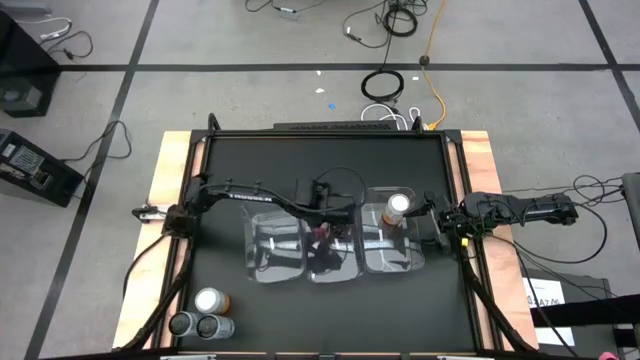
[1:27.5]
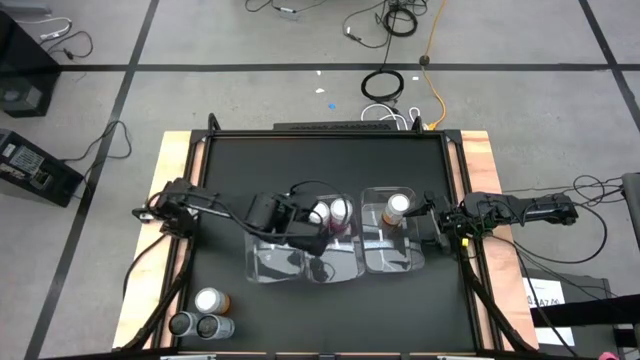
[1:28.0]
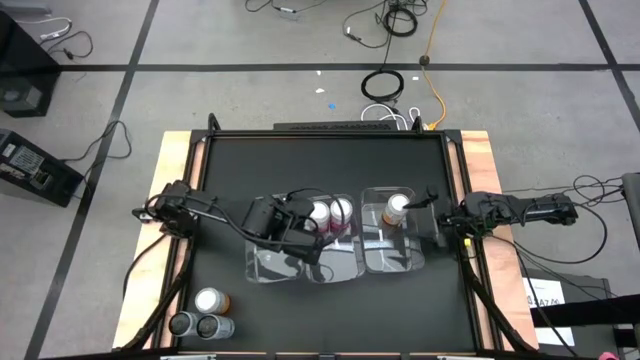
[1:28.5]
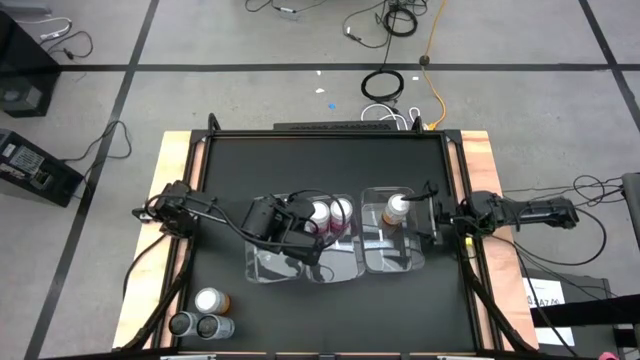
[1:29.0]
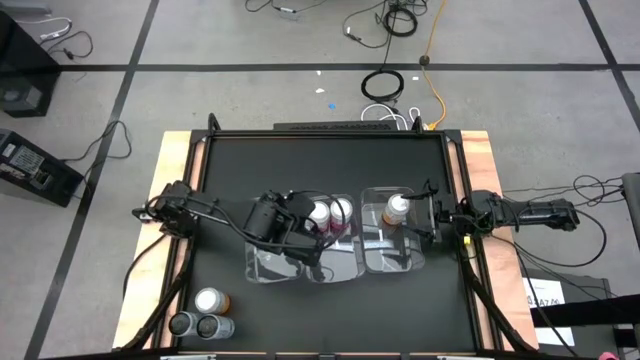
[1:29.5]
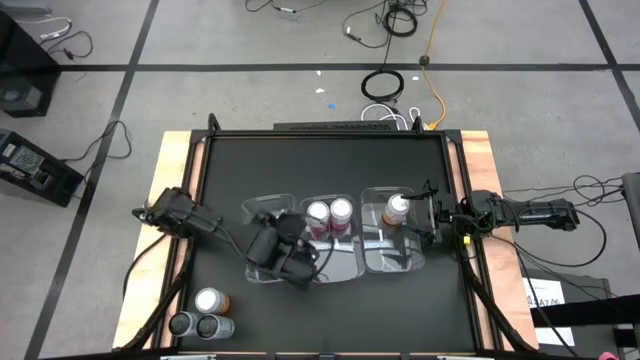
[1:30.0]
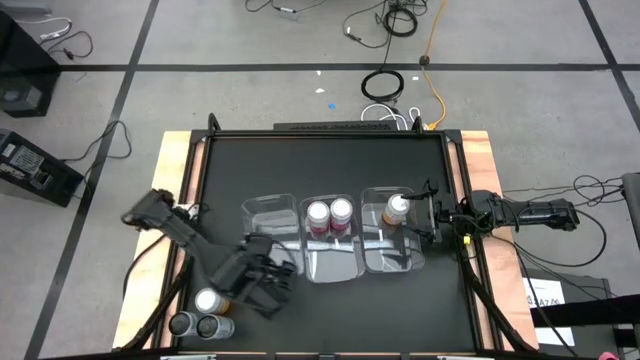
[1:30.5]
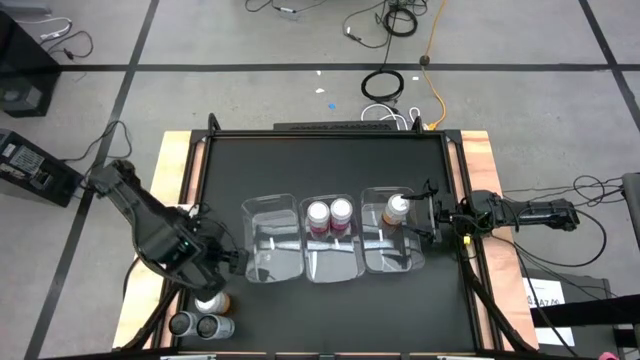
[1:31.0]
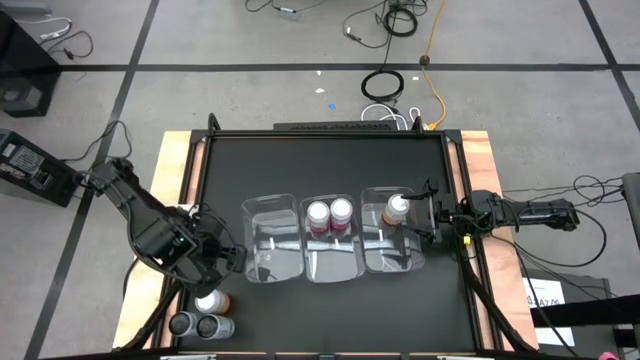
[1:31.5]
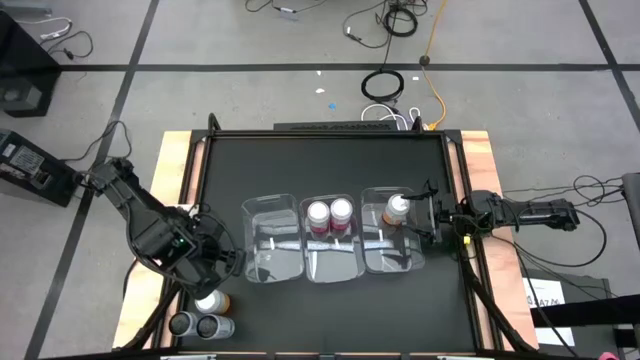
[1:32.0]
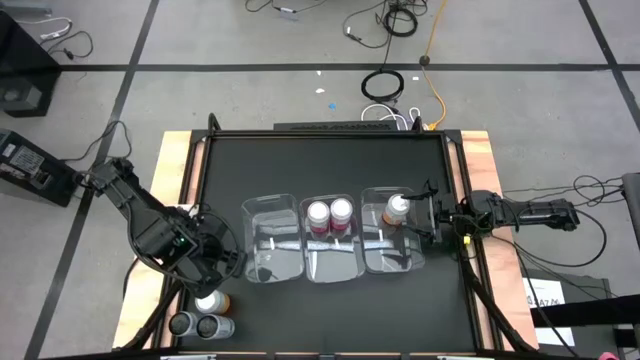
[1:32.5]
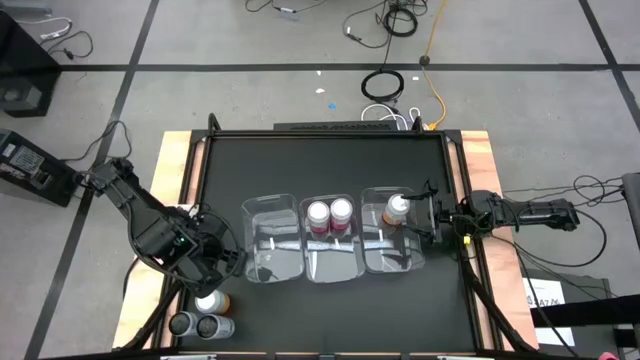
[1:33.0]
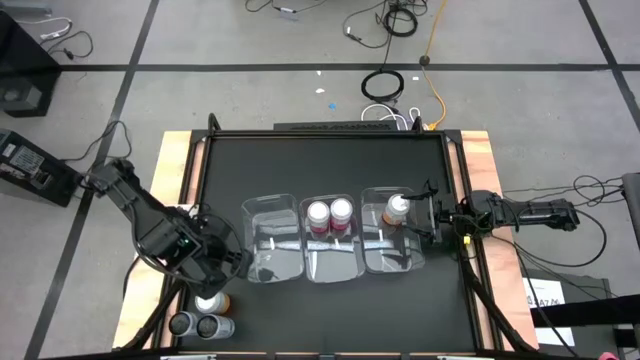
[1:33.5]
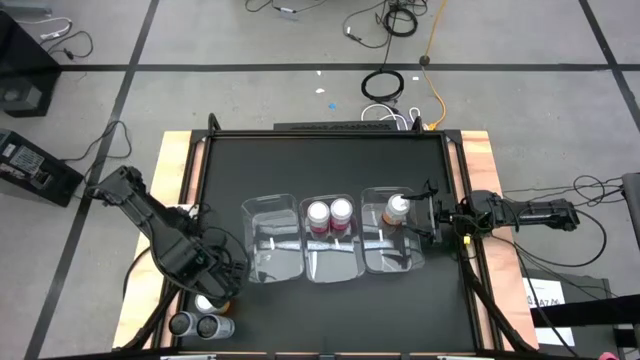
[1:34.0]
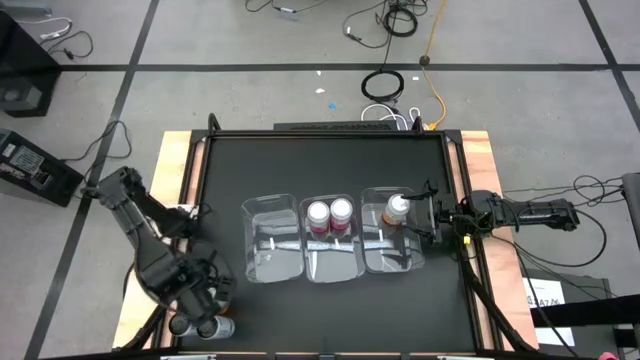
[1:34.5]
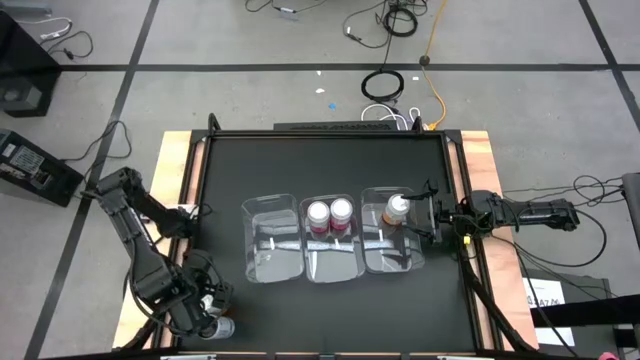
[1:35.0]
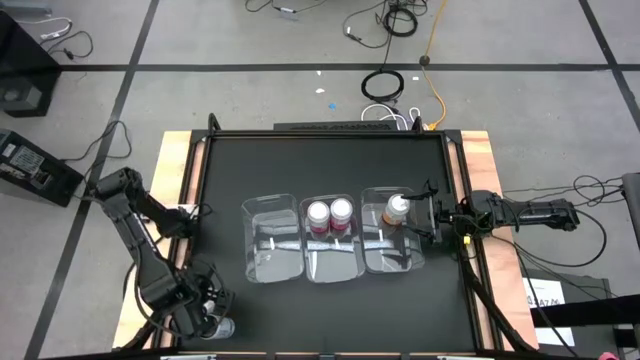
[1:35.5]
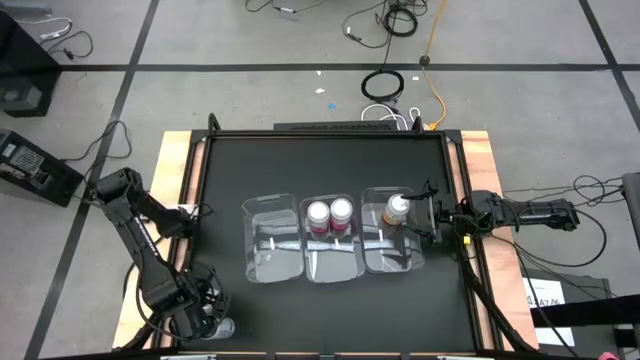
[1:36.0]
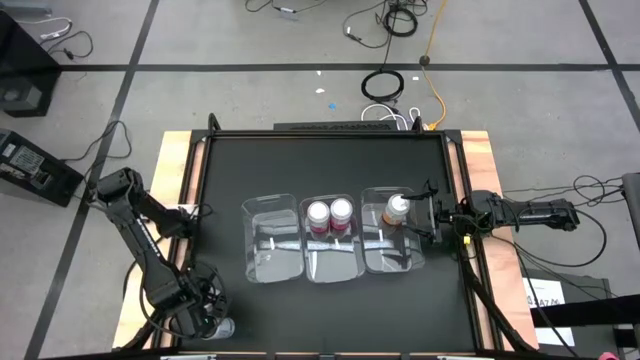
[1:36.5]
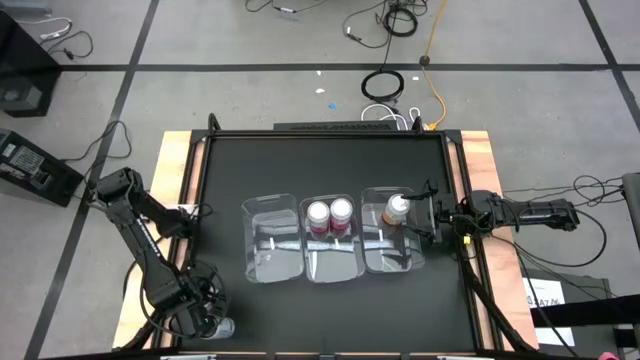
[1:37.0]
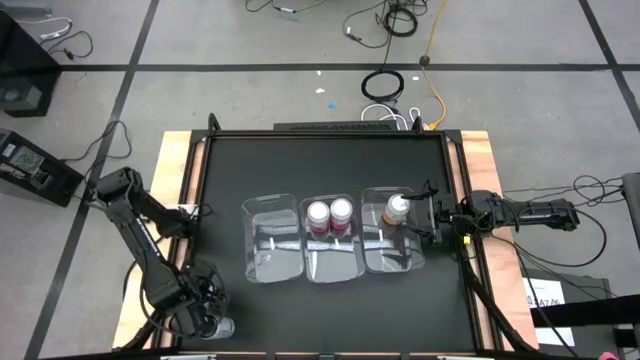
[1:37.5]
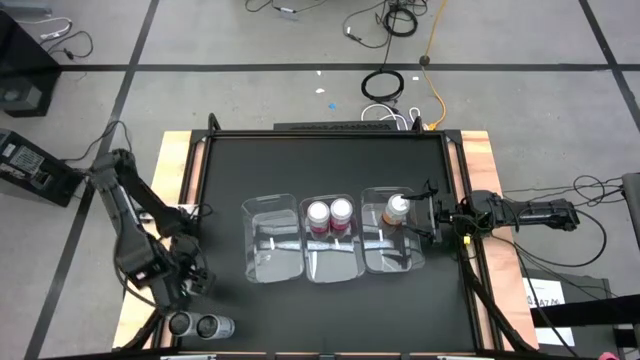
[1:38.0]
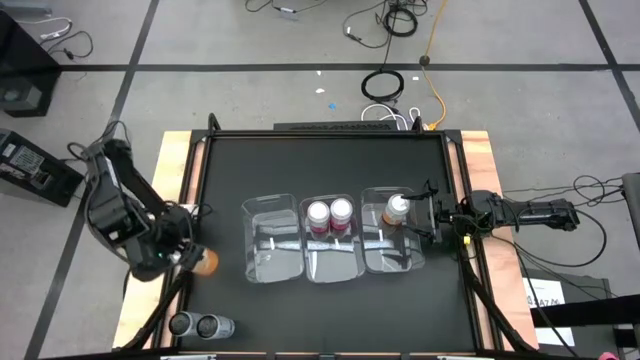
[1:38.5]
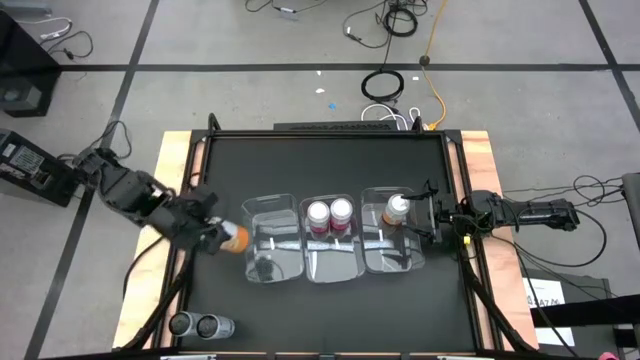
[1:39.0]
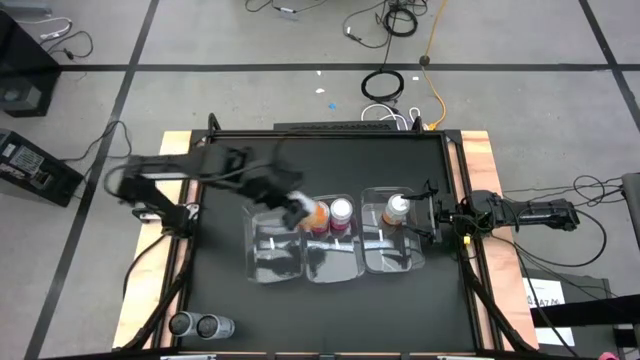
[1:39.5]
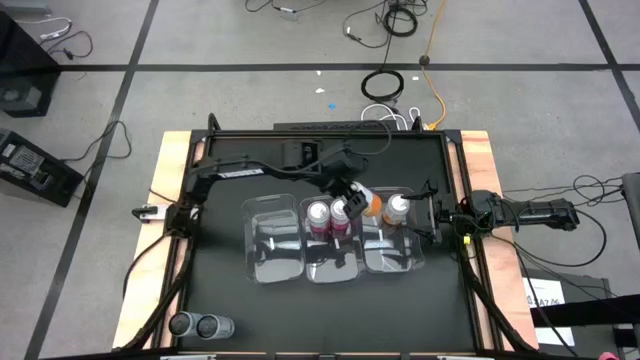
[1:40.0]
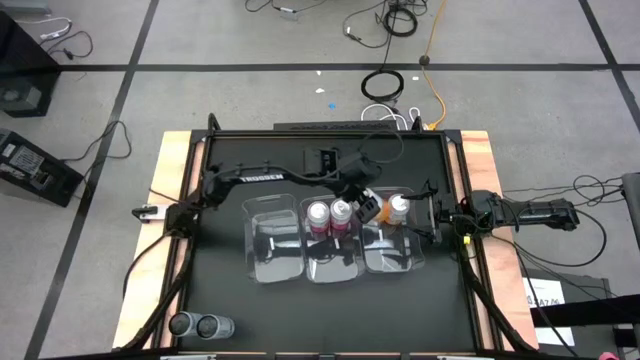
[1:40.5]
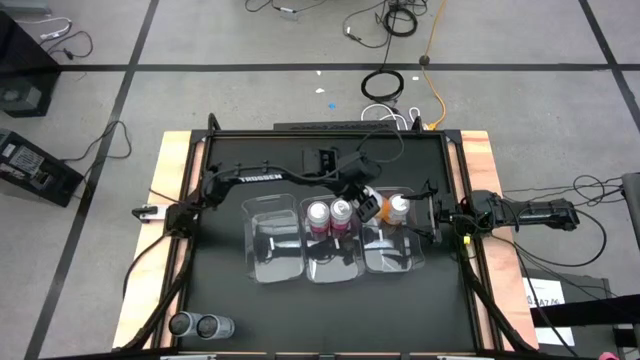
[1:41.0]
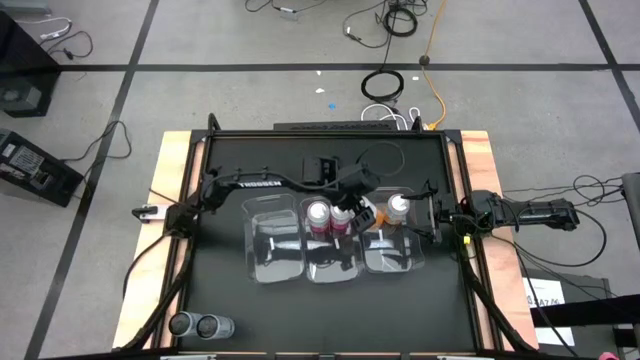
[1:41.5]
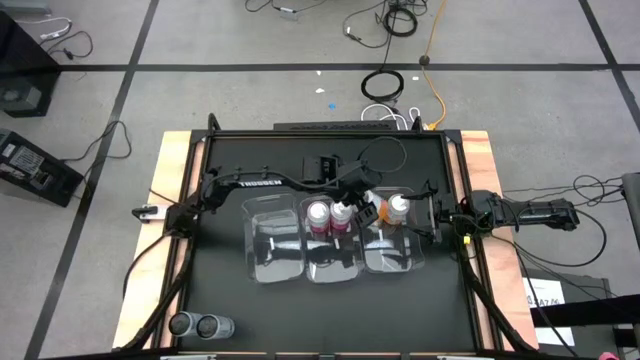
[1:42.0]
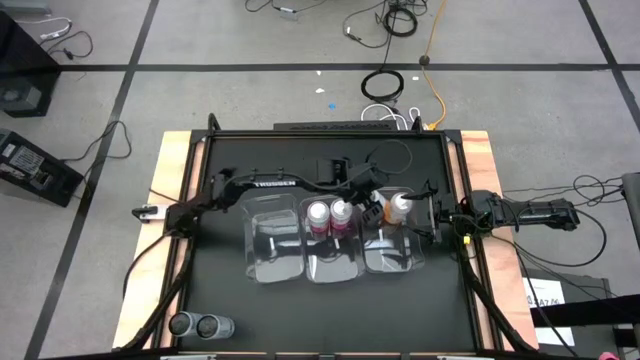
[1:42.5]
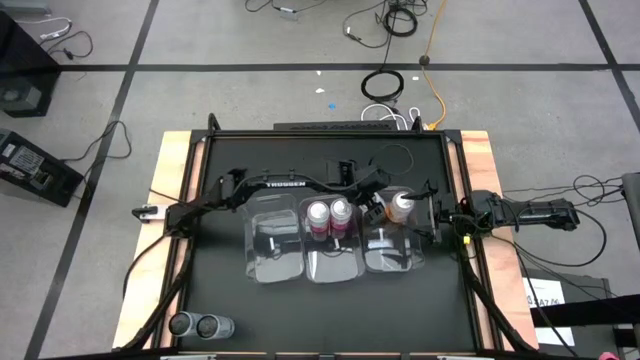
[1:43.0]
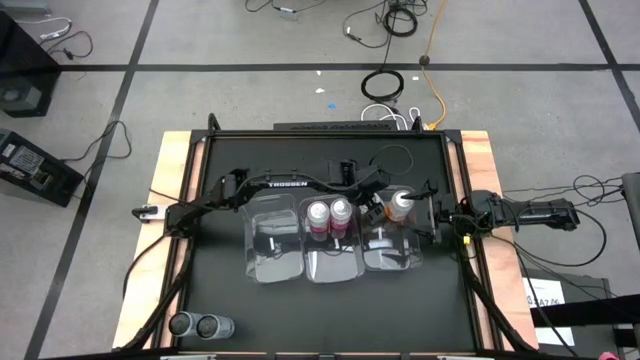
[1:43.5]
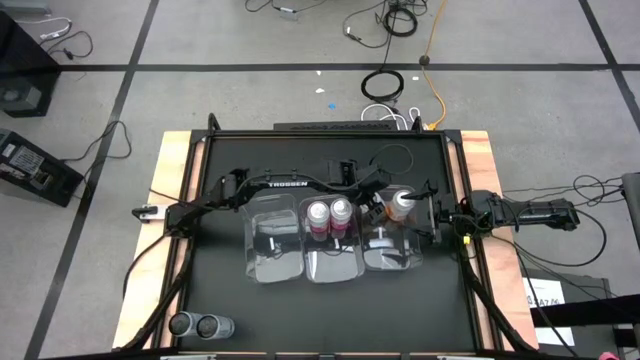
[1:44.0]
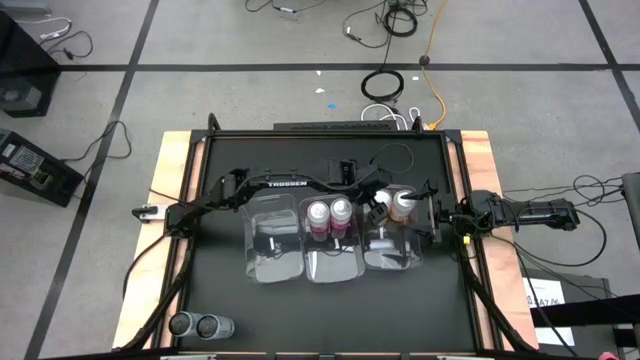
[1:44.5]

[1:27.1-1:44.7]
Task: Sort soda cans
Put the orange soda can into the right transparent bin

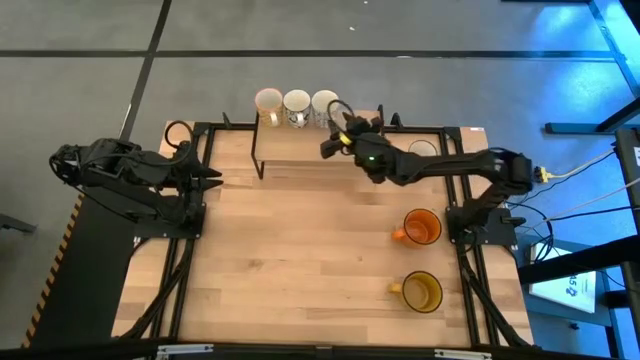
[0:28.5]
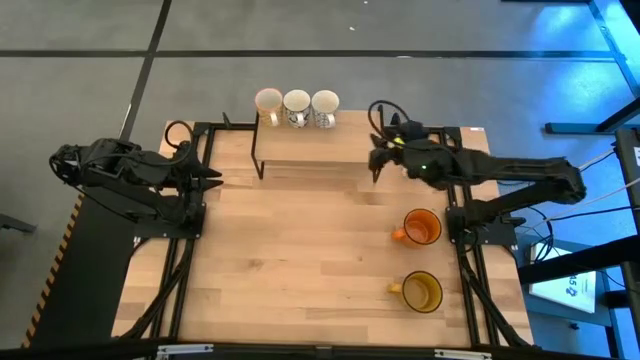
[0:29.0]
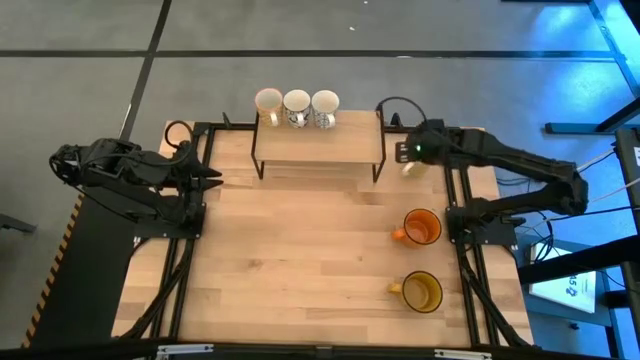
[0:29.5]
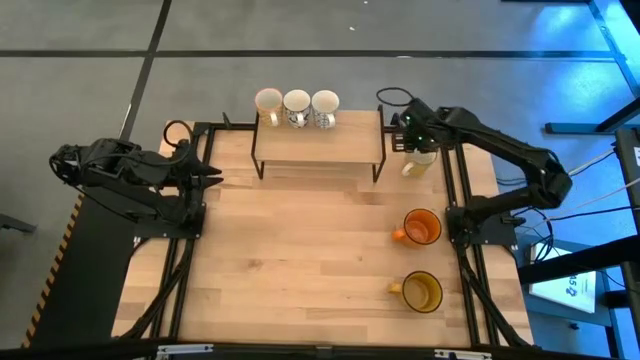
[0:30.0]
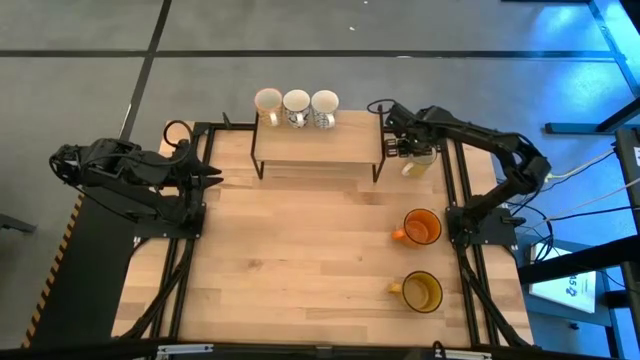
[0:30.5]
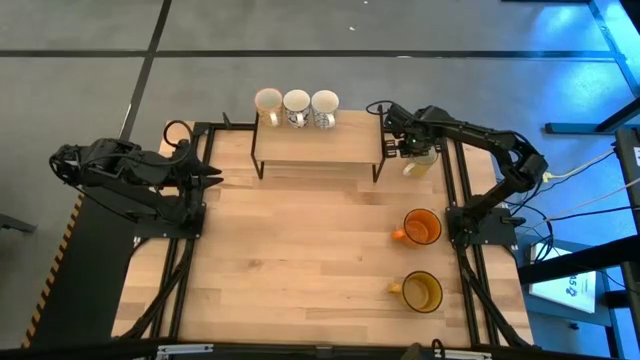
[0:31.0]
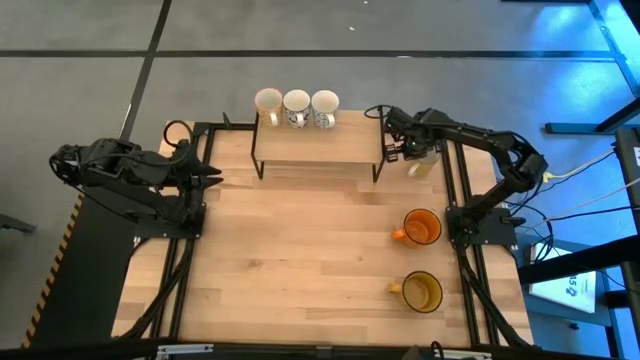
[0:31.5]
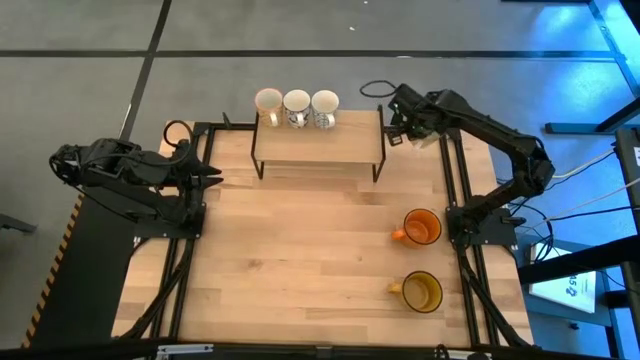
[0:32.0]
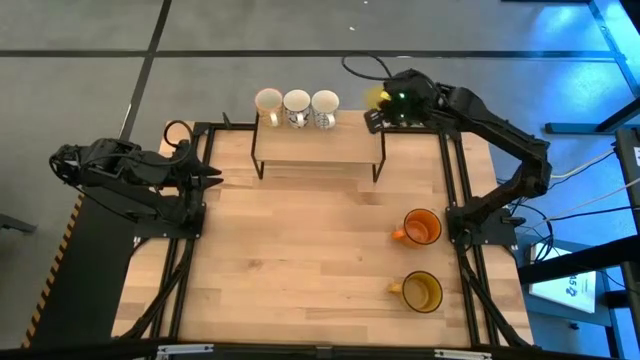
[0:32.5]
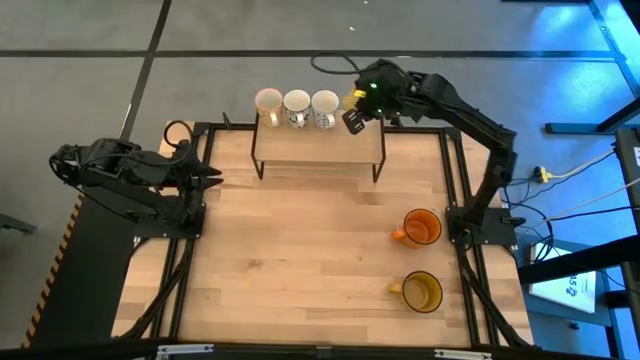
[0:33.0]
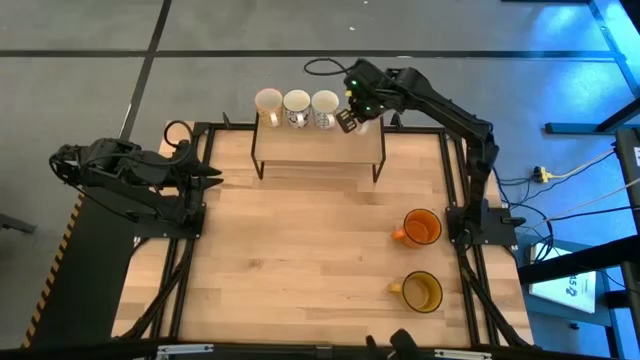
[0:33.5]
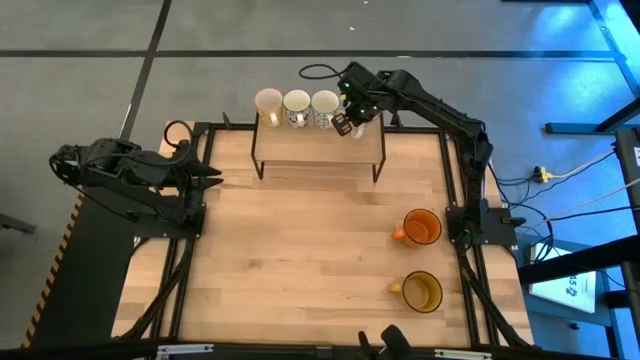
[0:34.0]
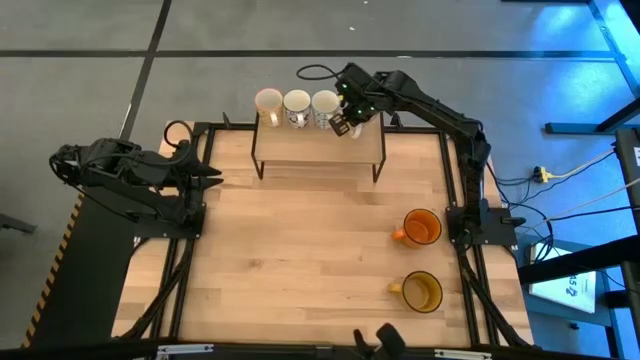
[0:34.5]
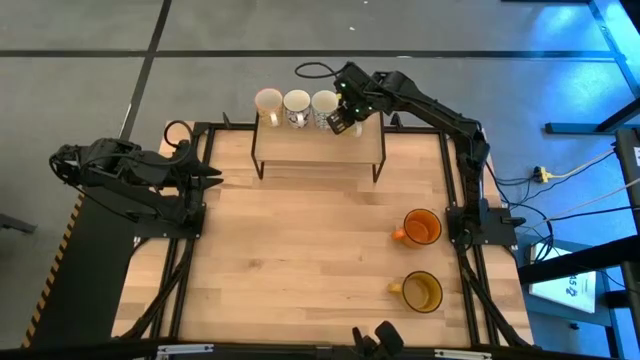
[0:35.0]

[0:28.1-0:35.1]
Task: Place coffee mugs
Put the yellow mug on the shelf
